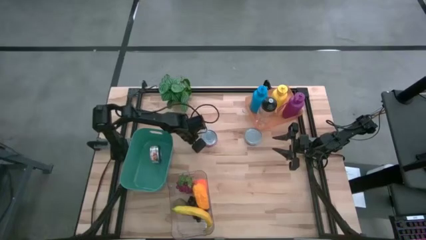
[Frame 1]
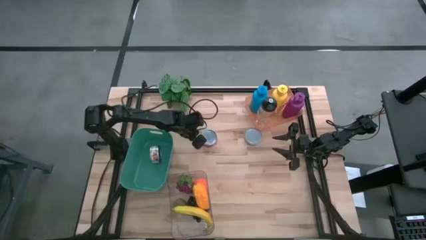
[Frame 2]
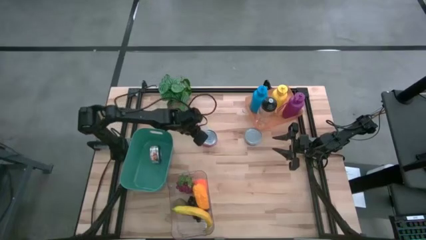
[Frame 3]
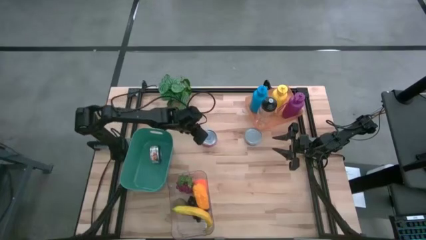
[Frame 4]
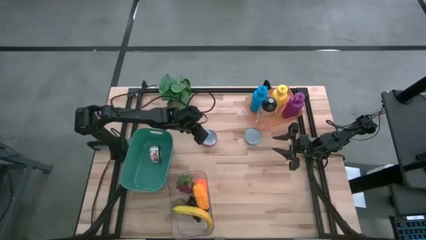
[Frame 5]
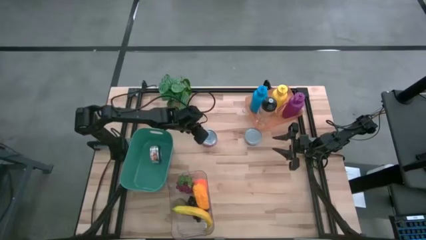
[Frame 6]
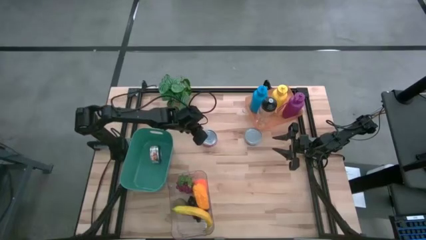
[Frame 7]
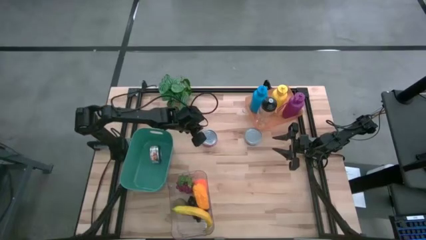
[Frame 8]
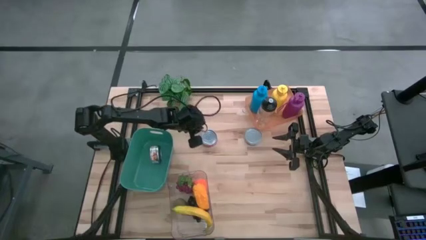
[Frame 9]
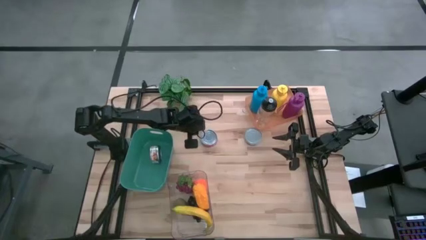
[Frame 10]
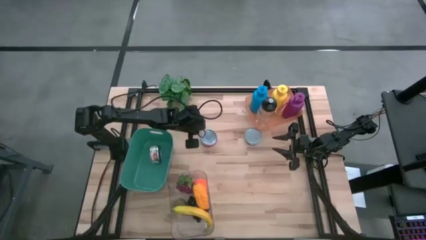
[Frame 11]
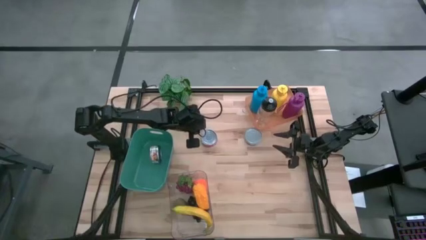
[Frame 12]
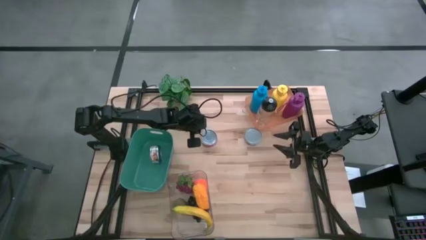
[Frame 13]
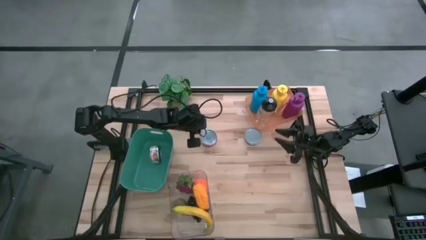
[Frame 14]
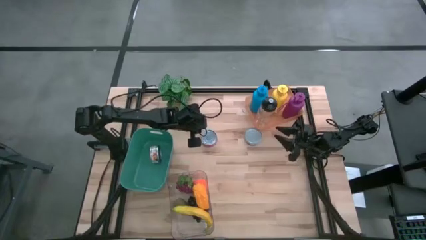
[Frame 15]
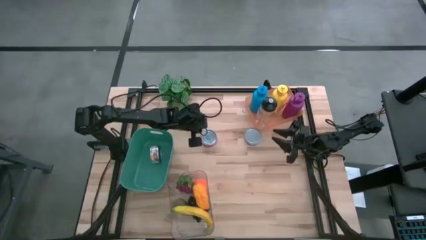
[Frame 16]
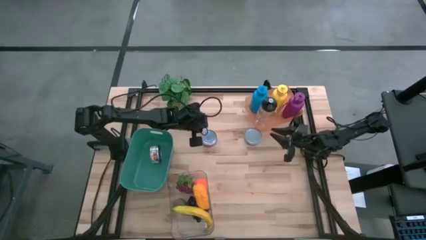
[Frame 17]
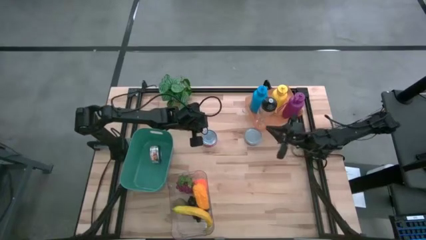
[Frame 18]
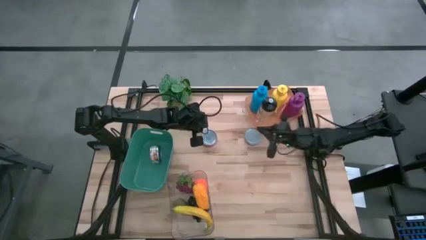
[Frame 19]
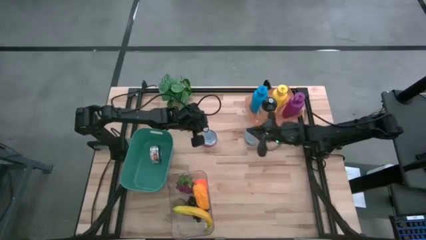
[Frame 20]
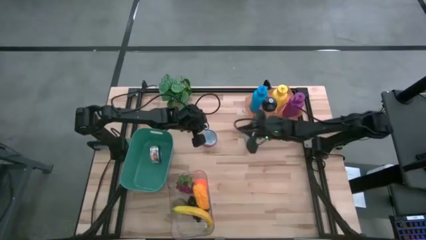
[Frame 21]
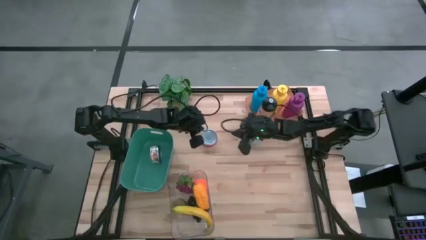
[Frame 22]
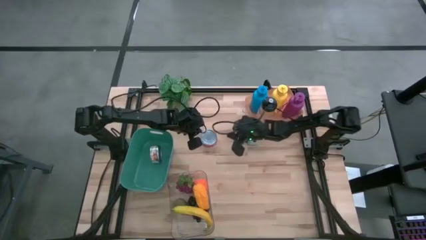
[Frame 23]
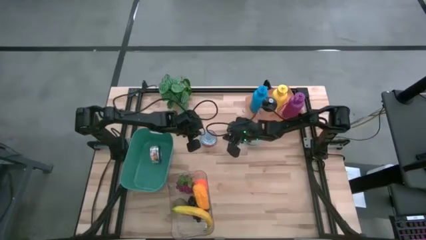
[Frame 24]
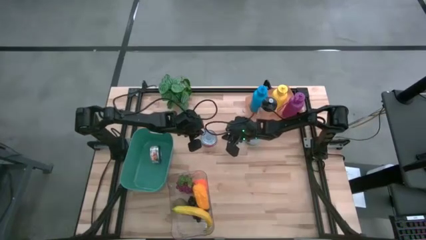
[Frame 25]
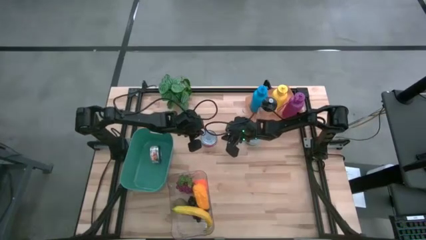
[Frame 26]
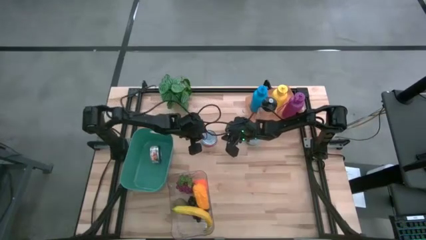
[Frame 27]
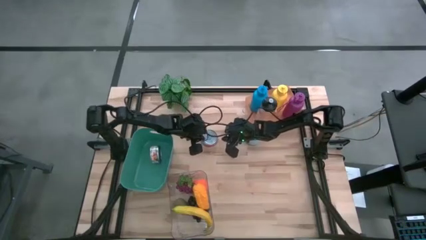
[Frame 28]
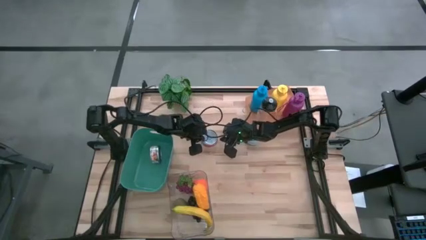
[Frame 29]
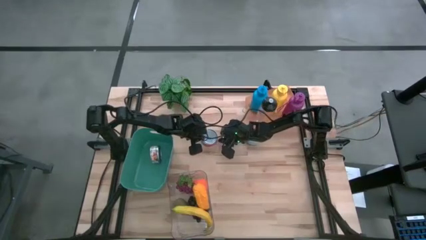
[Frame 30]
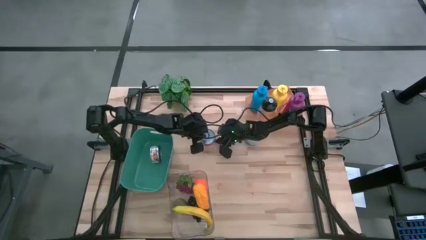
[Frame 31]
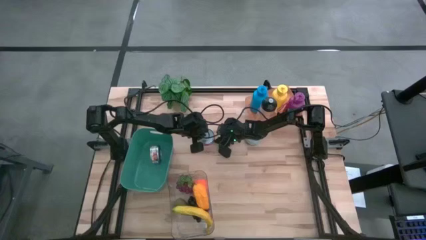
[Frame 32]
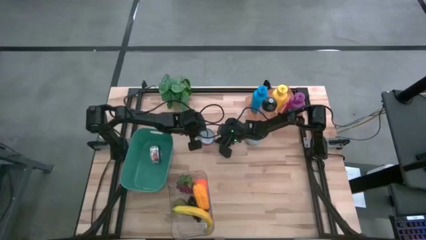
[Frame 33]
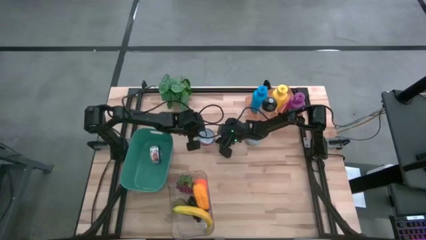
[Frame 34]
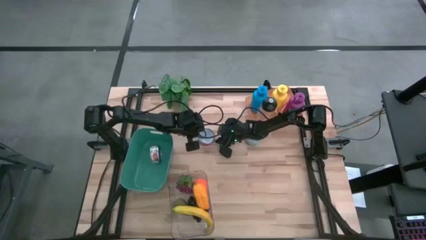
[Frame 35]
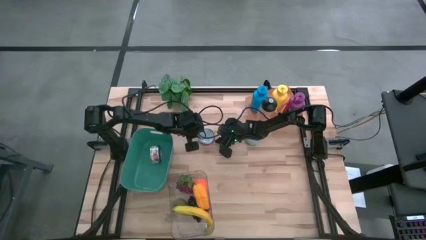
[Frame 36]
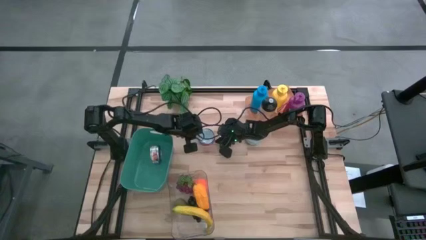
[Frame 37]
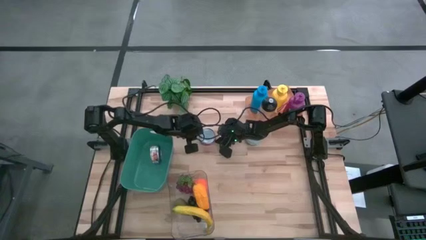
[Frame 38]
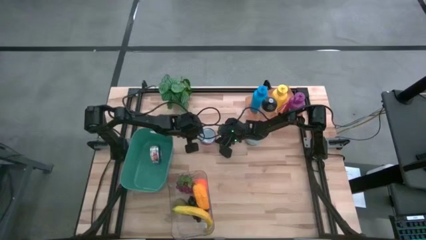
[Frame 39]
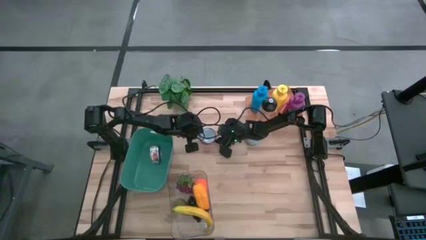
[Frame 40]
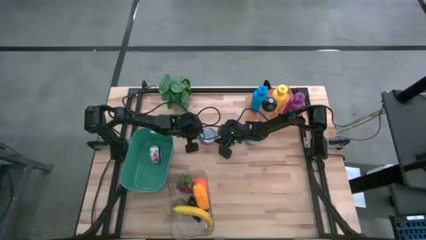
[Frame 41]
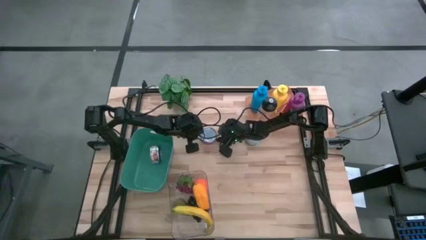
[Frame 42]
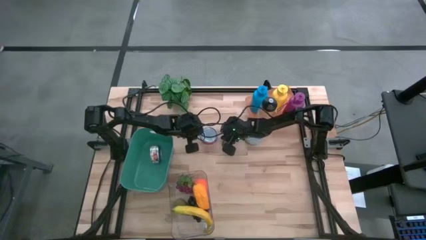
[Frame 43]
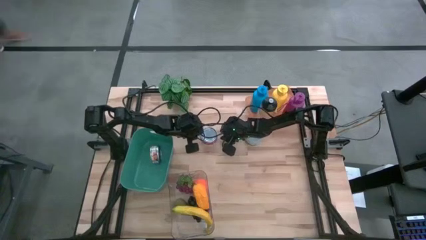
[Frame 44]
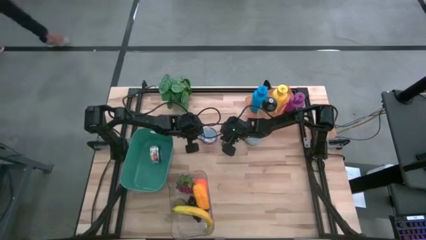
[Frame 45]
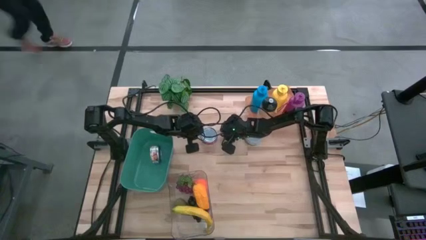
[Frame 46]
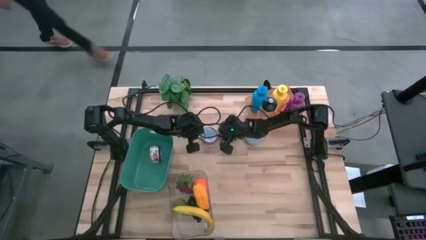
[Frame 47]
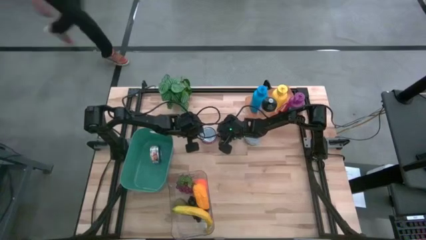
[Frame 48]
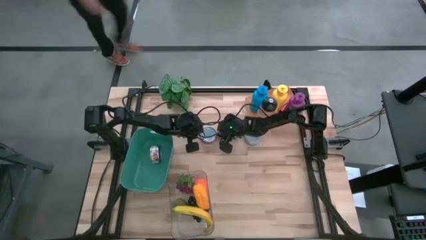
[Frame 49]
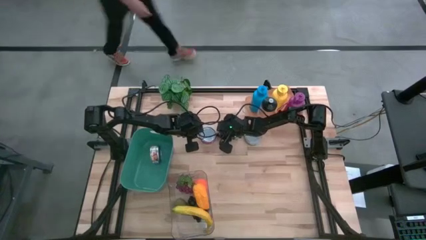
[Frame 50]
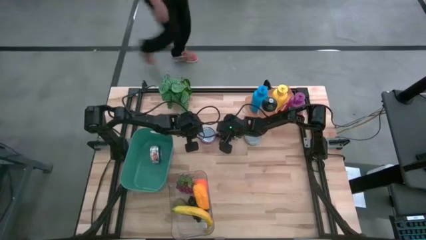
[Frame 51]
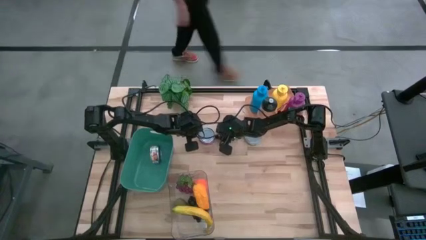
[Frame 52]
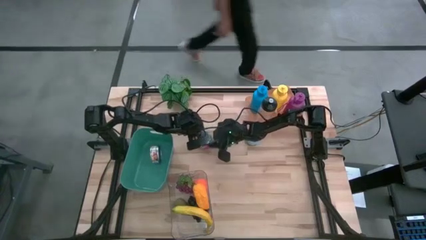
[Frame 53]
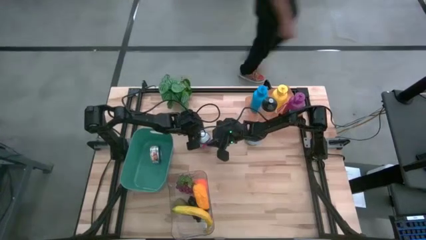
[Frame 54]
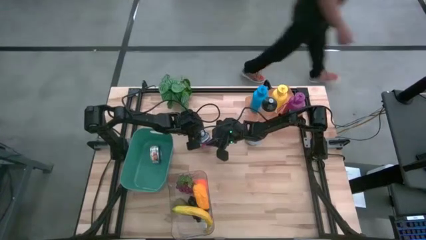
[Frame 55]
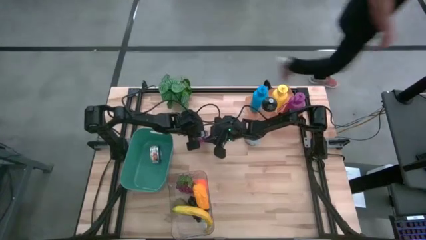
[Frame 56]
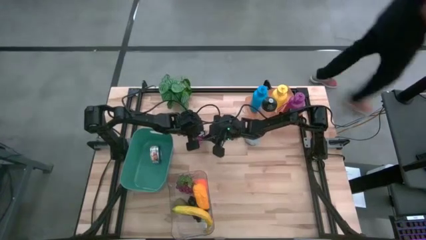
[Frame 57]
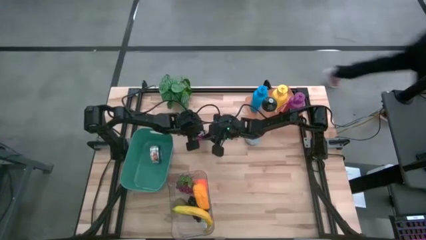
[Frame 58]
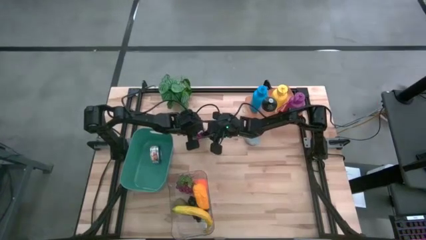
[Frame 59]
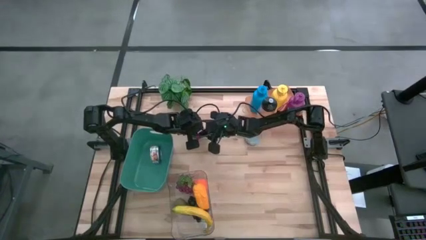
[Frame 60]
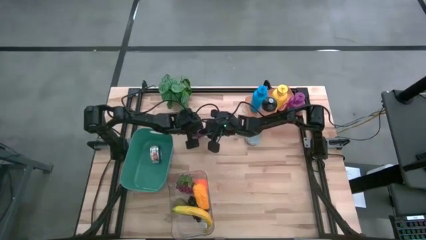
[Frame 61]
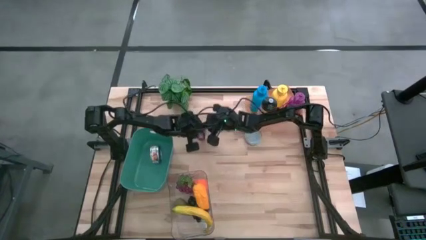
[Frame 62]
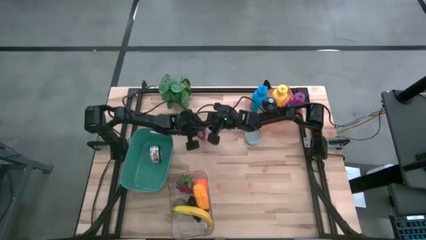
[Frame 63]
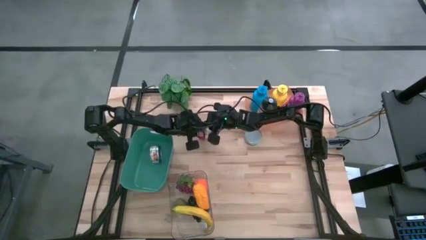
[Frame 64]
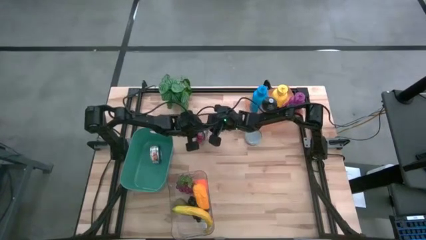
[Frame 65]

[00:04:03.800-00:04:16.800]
Task: Pick & Place Food Item
Put the red tuna can into the blue bin

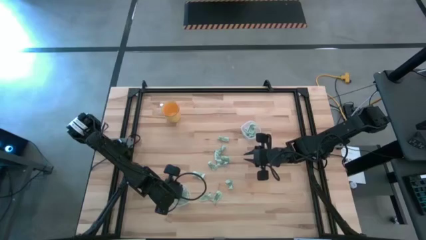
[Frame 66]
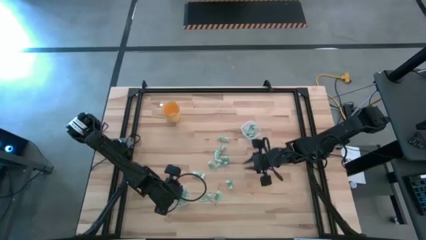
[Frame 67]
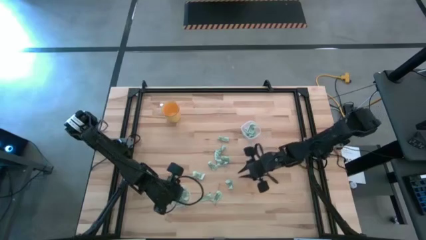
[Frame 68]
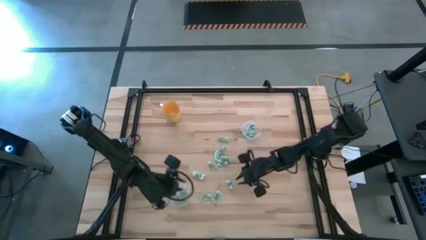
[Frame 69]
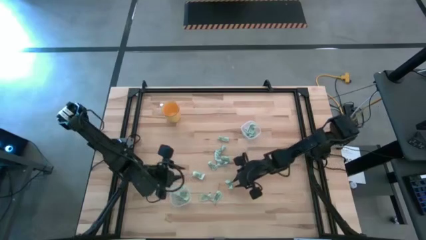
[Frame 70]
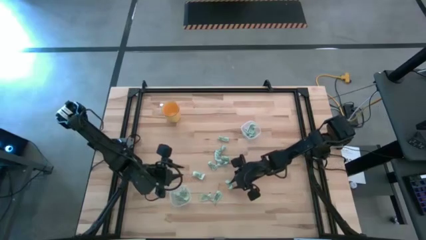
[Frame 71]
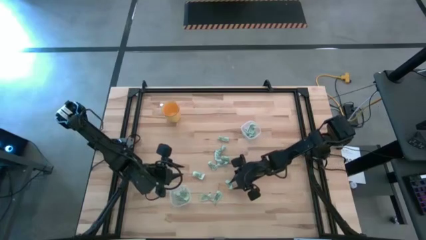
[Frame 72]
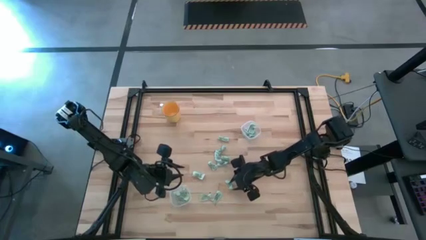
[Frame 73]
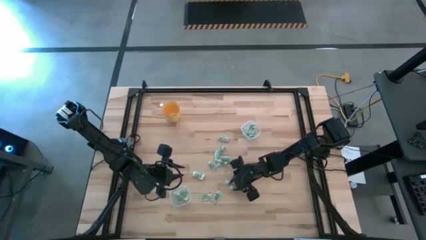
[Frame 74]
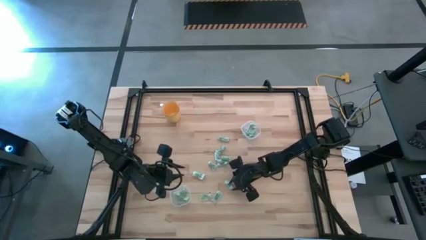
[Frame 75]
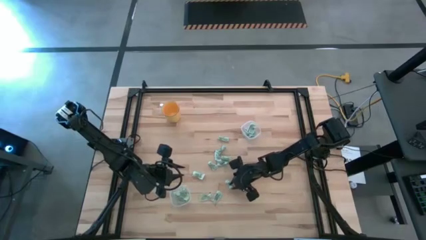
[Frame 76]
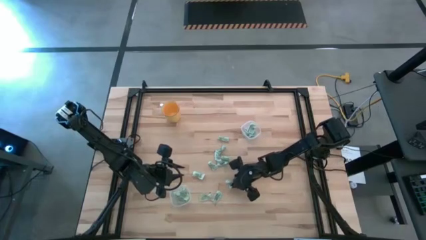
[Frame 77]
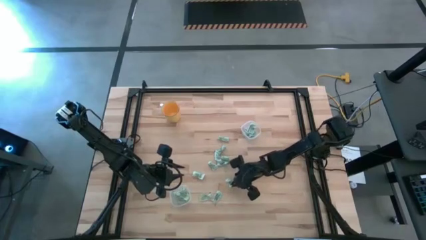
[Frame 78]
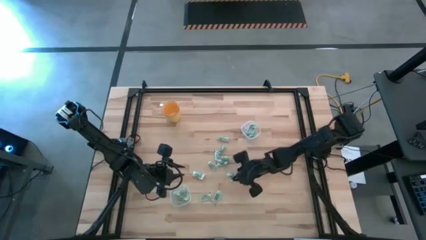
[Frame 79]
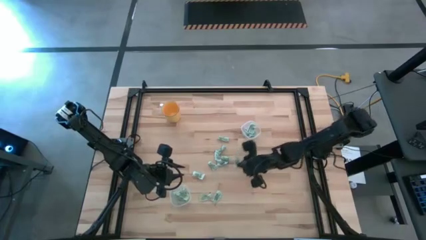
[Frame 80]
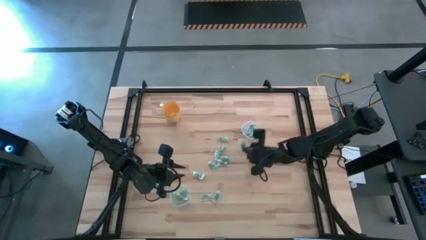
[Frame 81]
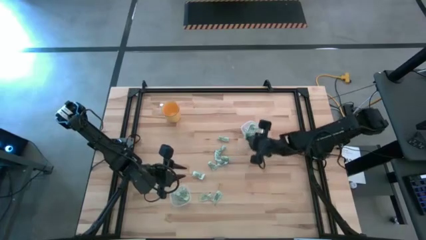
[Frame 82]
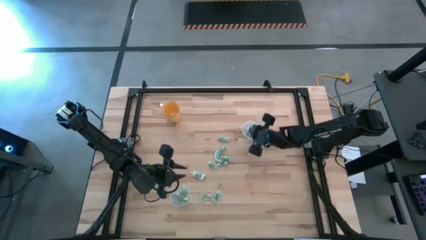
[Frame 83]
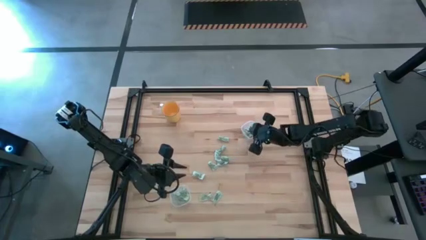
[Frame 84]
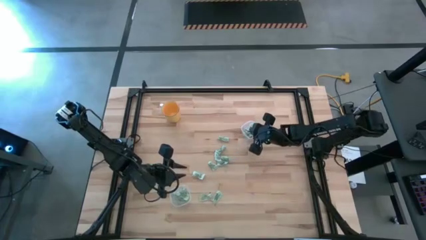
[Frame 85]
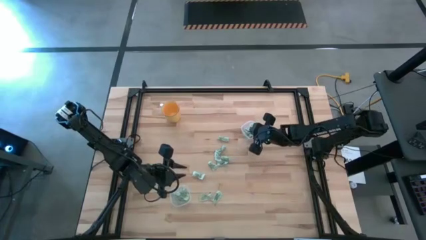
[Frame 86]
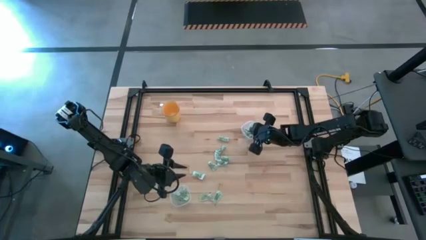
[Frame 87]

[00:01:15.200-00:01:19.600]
Task: Pick and place Stevia / Truvia into bins
Put the green stevia packet into the top transparent container
